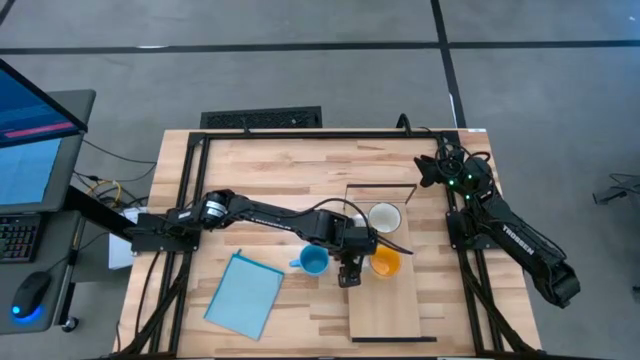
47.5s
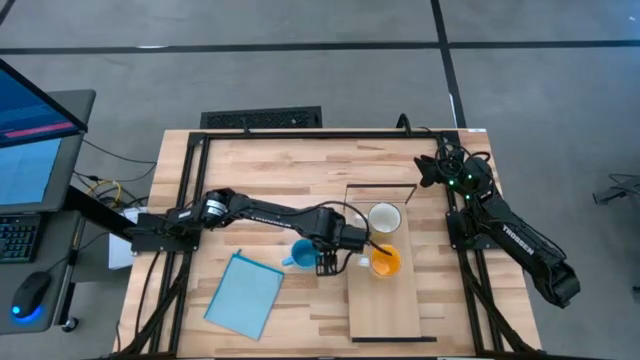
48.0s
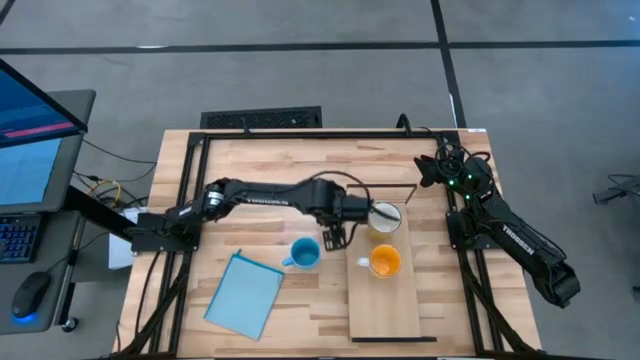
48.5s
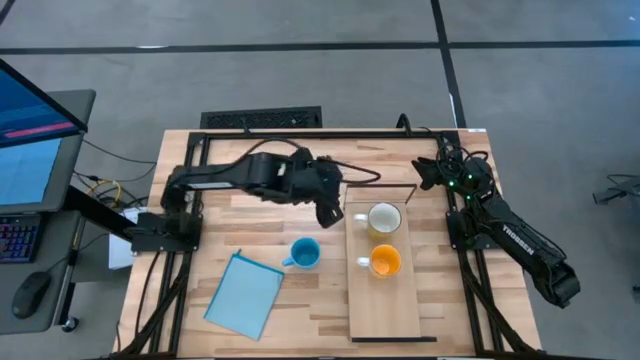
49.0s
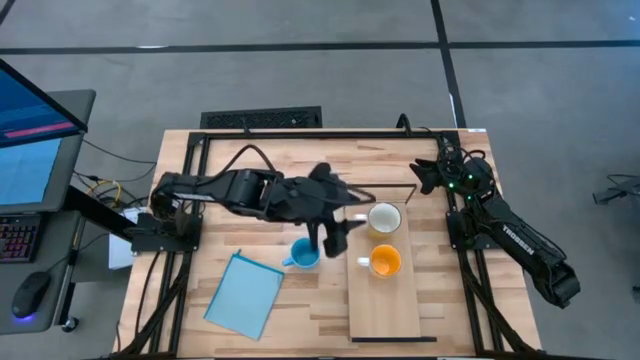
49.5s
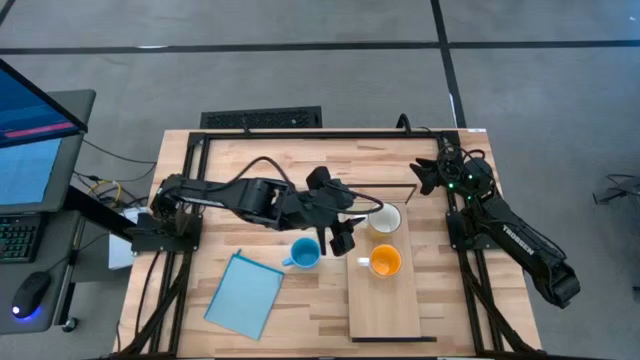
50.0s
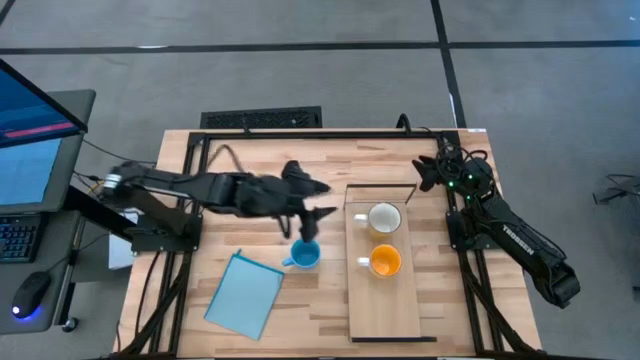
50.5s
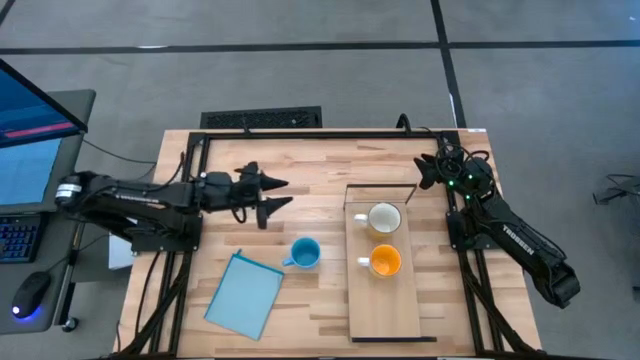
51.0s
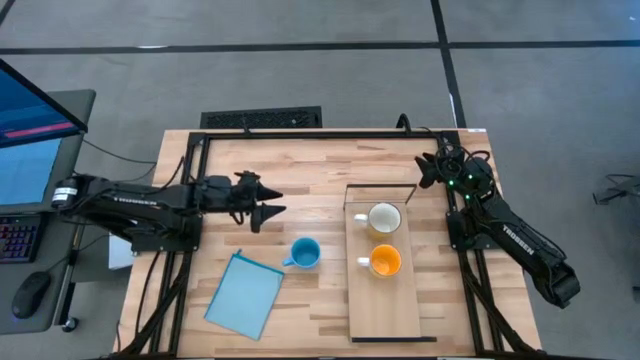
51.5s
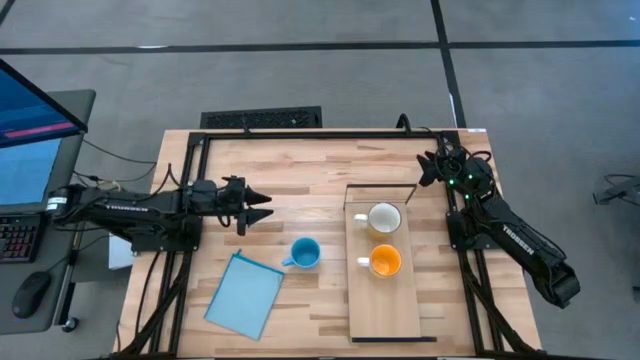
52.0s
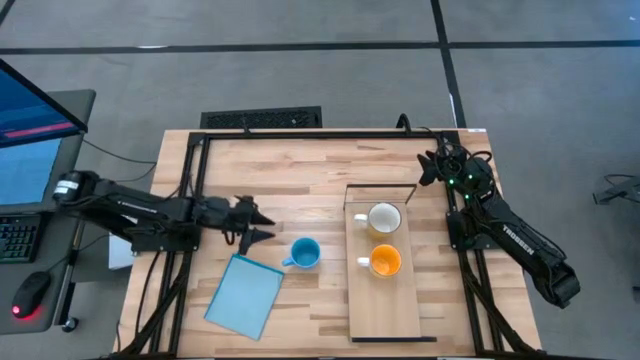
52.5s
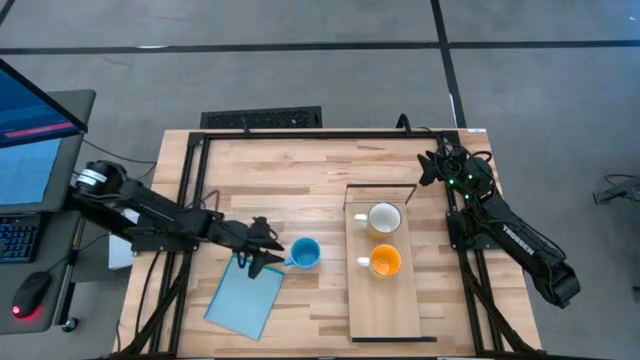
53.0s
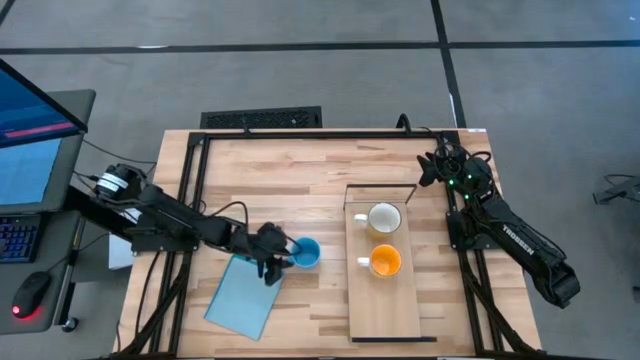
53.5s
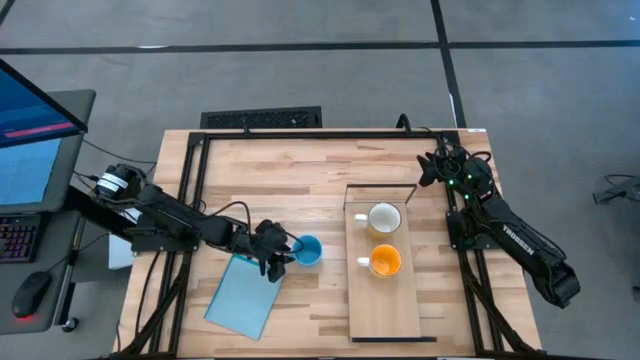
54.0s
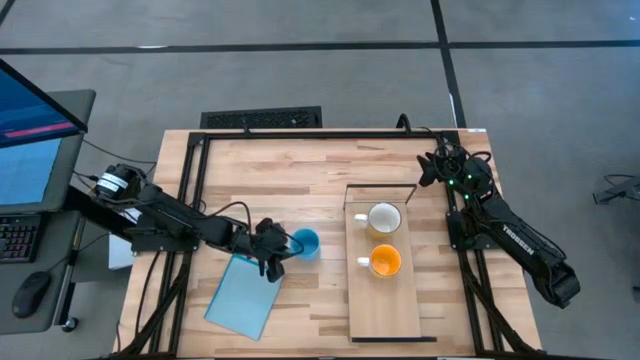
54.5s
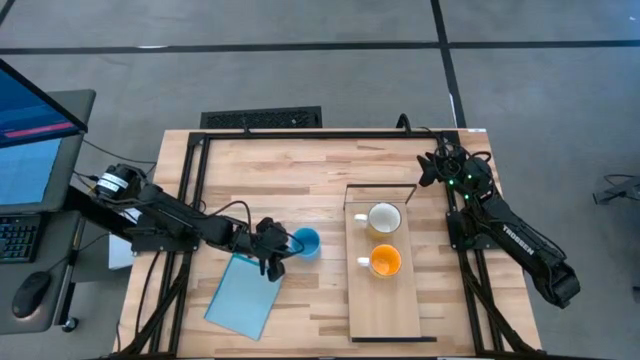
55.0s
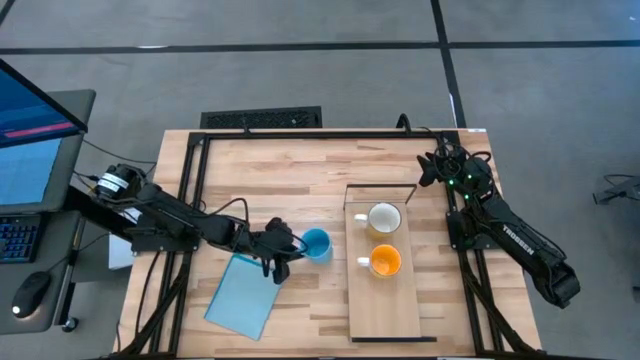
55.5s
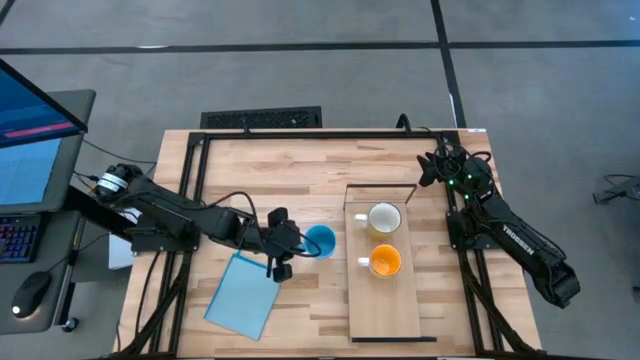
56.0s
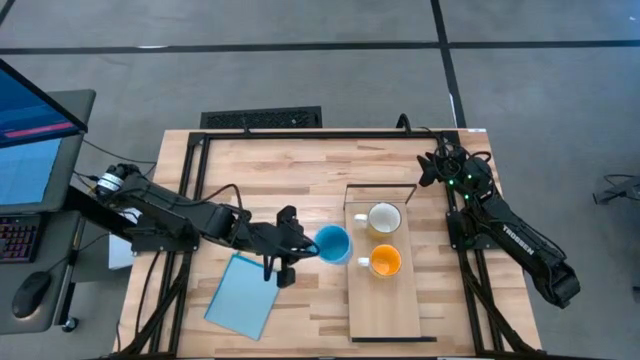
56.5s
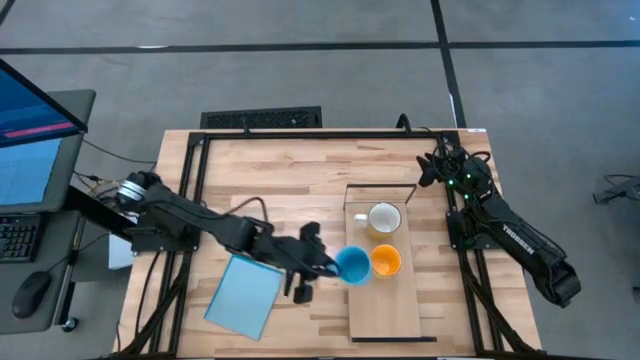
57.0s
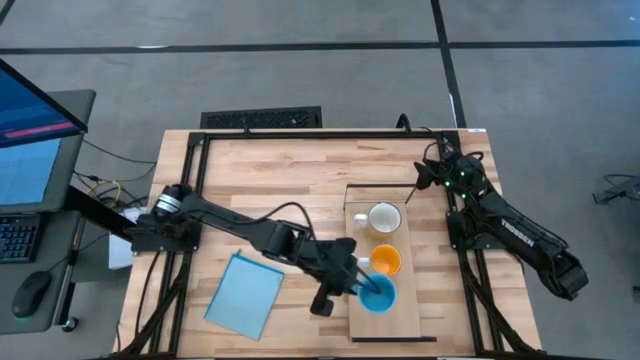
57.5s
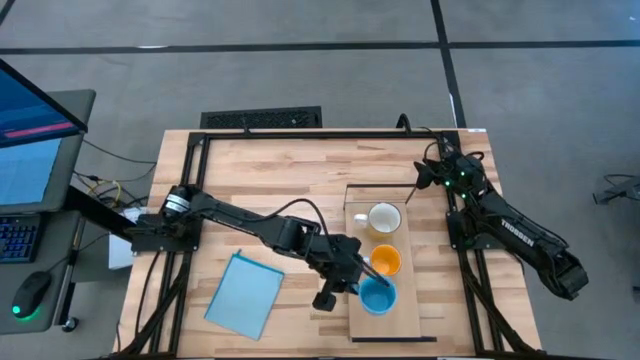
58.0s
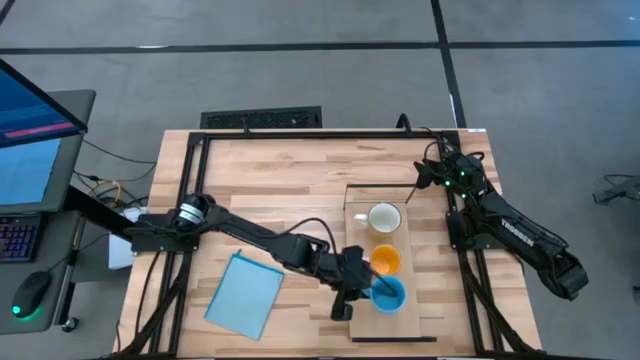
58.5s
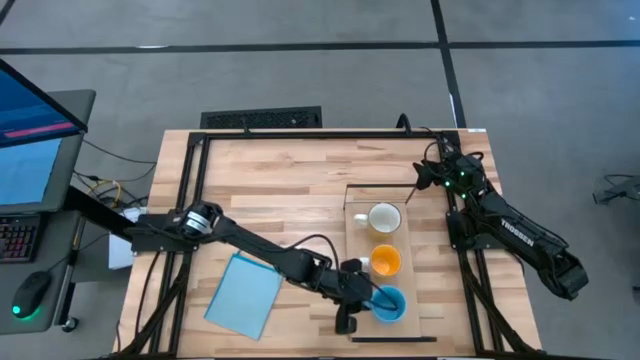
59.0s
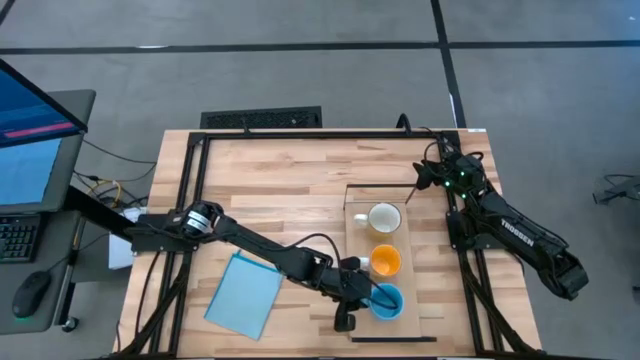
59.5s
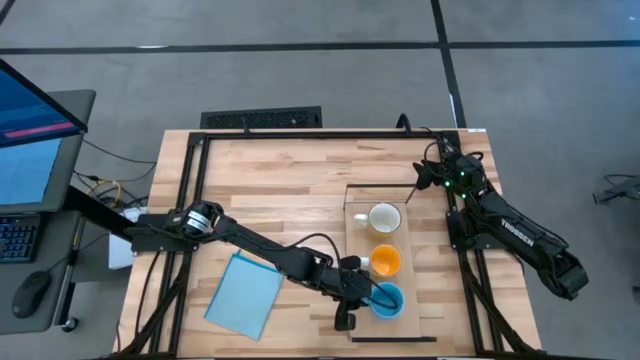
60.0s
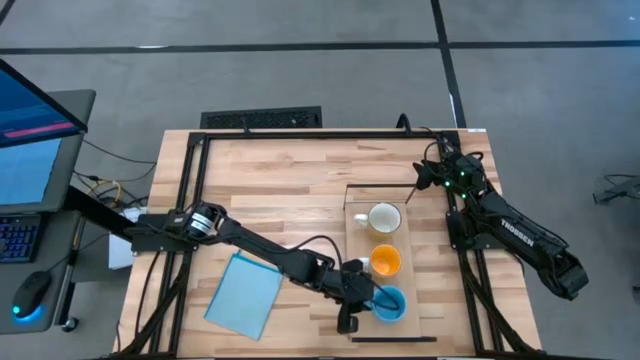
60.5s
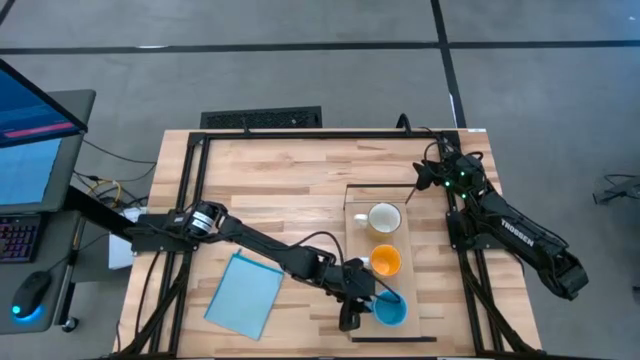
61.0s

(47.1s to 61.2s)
Task: Stack small to large cups/mugs on shelf
Put the blue cup on the shelf

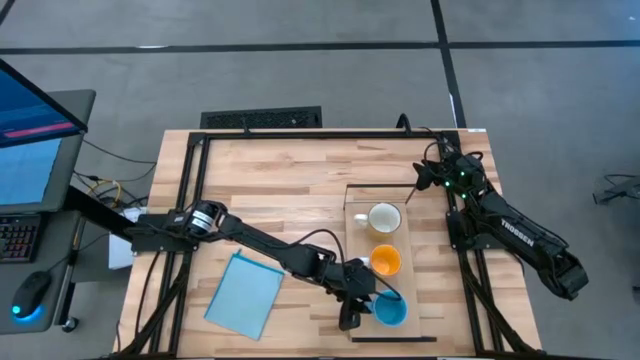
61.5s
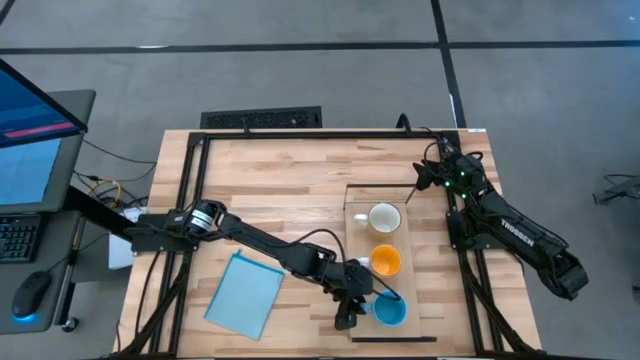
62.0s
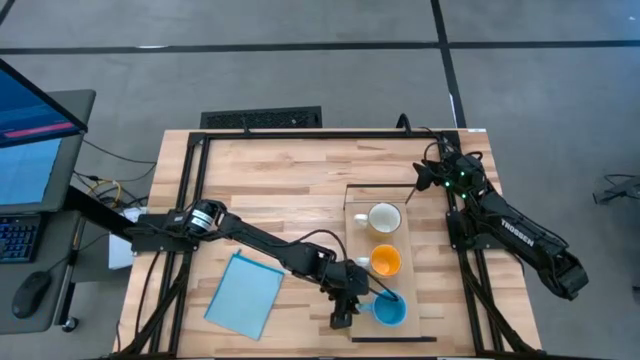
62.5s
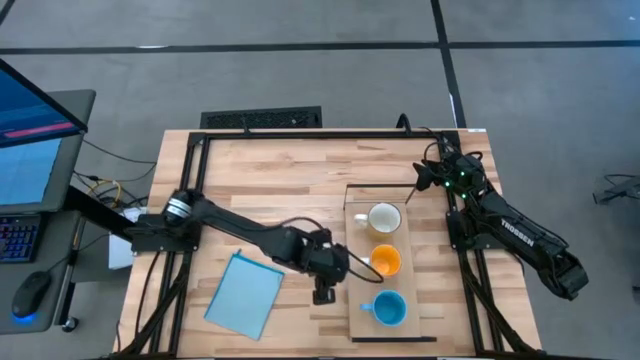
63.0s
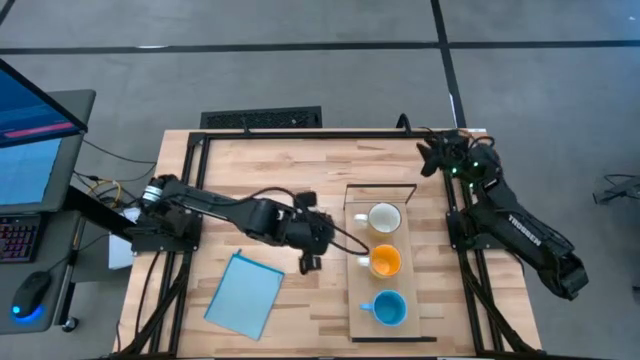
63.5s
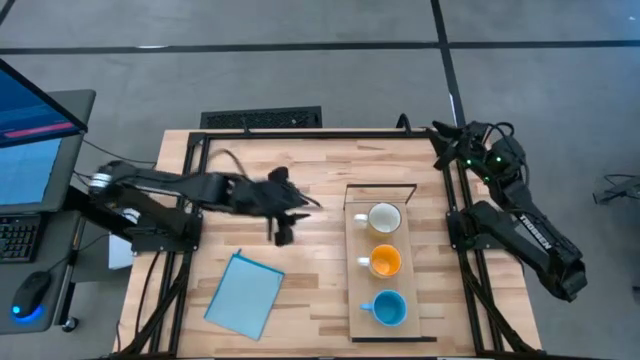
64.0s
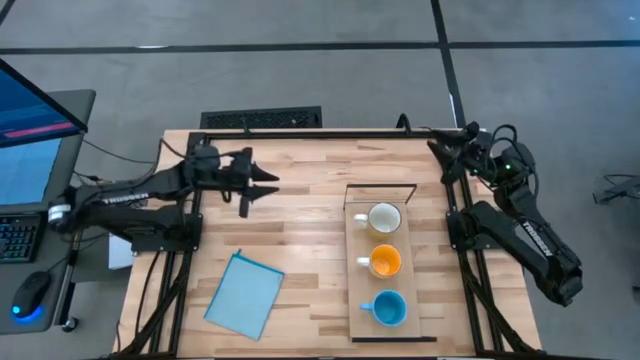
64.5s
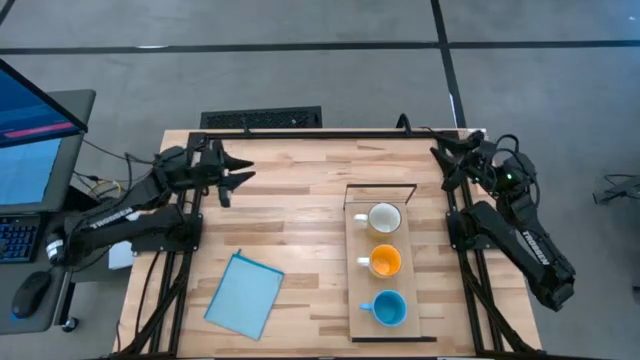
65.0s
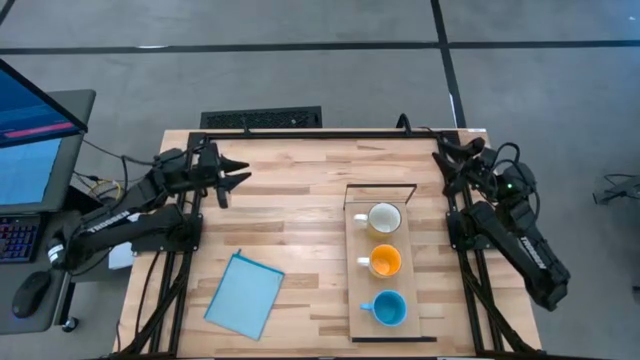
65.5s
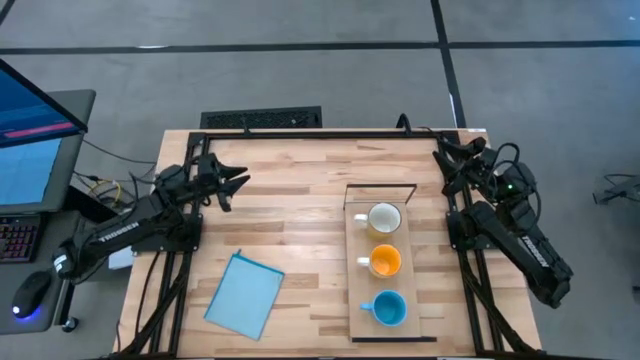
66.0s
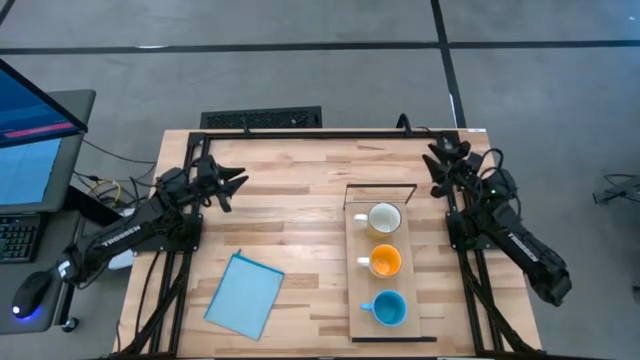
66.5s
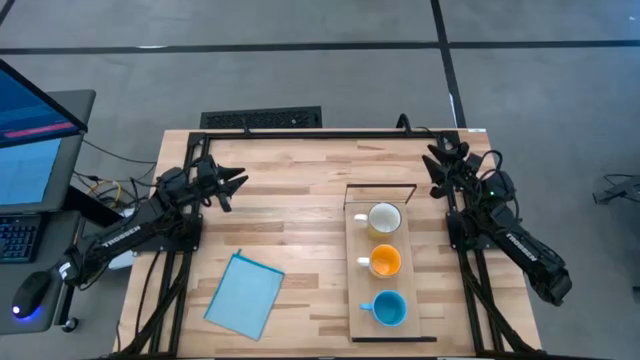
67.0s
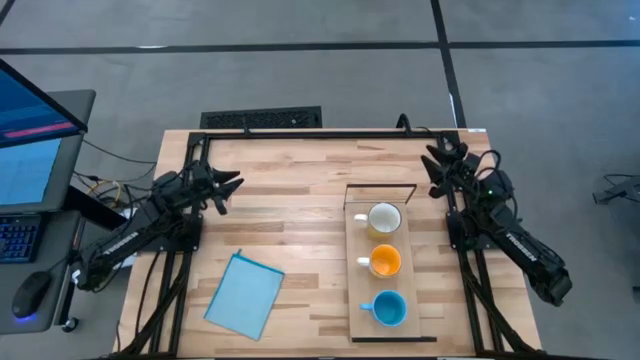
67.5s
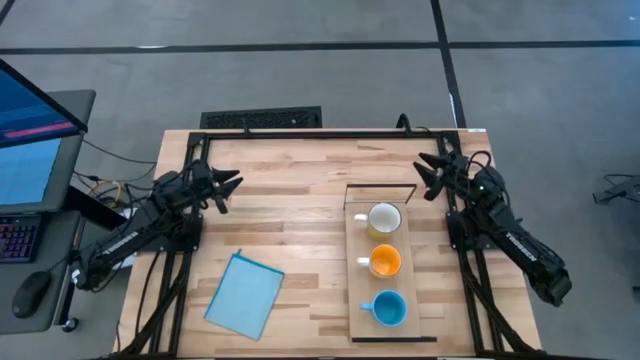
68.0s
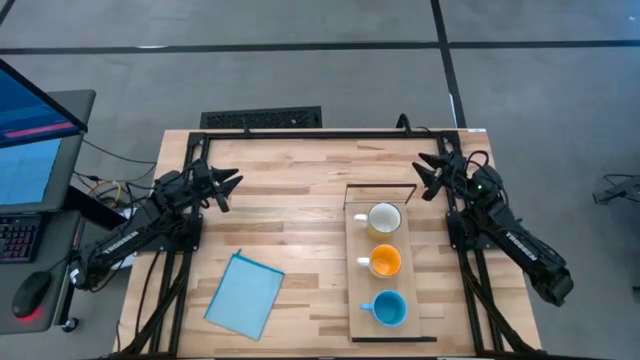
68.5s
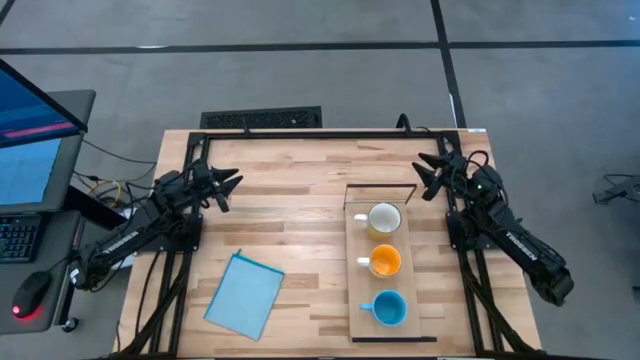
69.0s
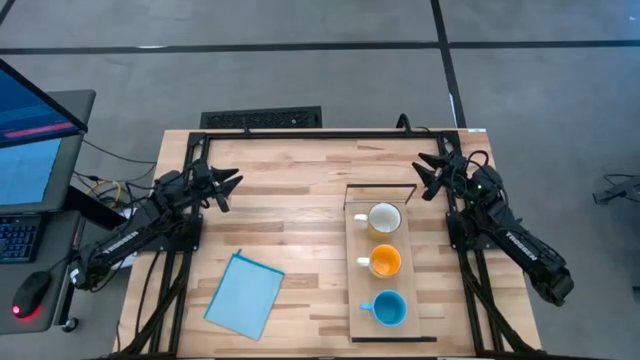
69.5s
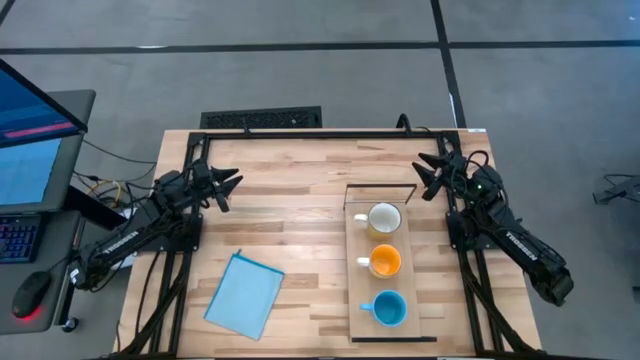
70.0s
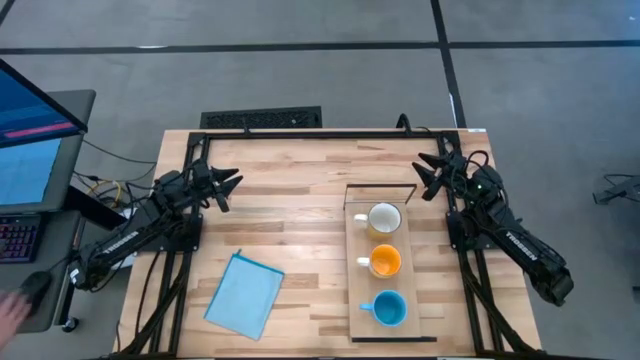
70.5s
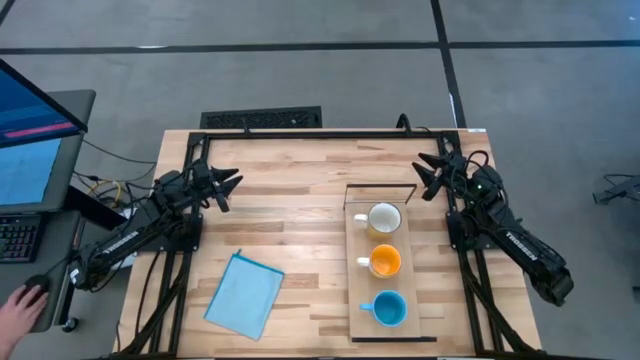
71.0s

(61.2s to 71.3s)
Return to Home Position
